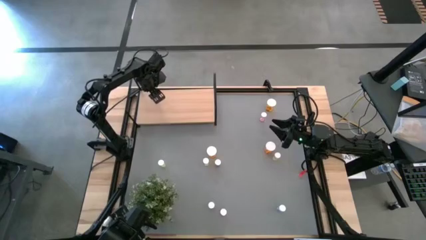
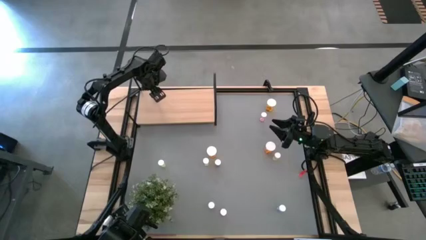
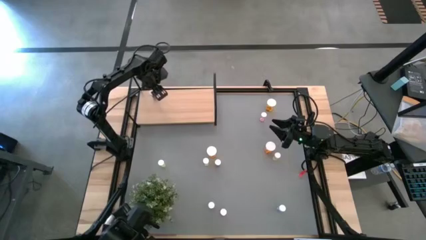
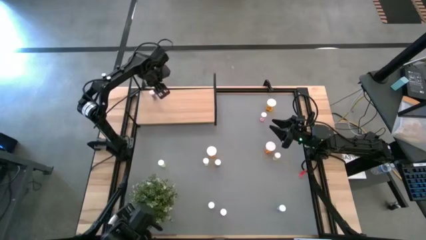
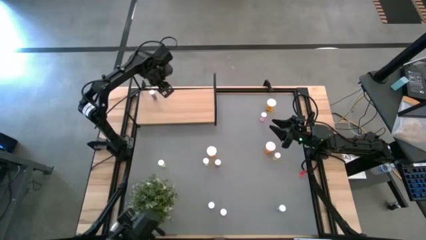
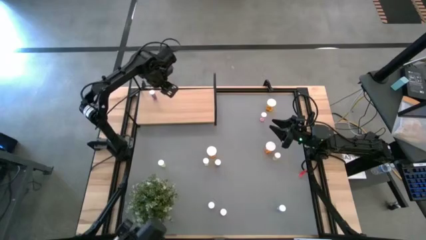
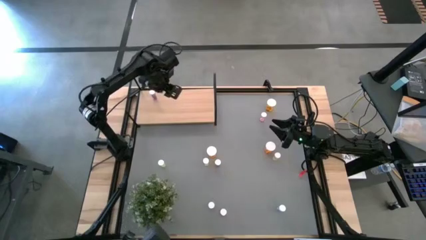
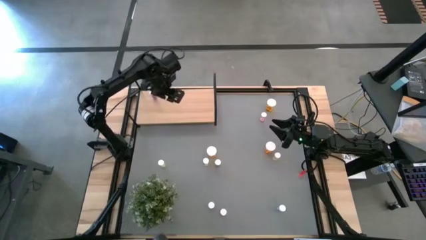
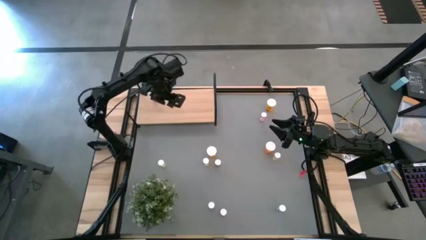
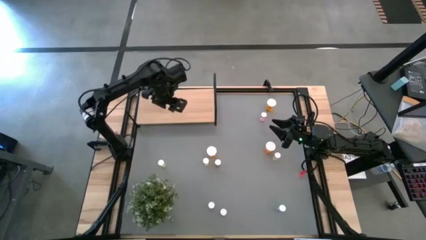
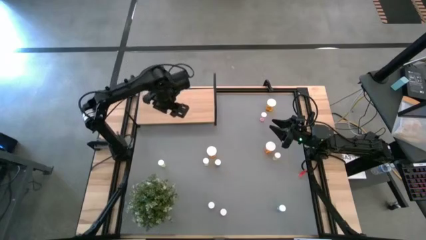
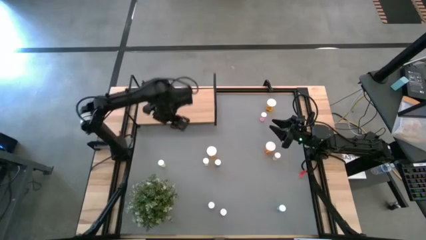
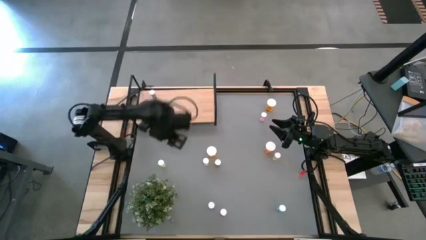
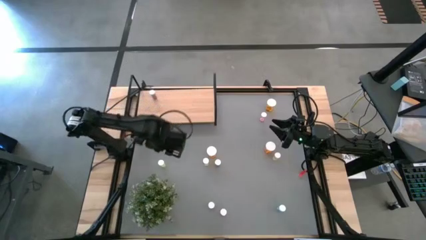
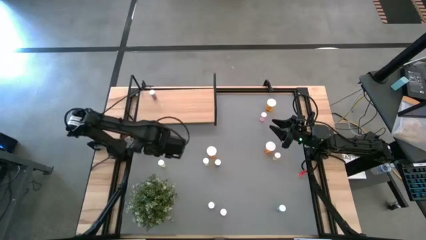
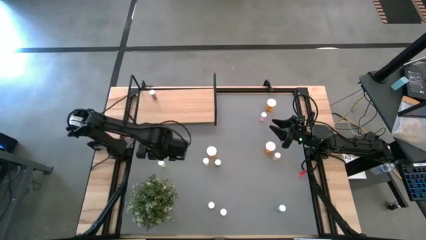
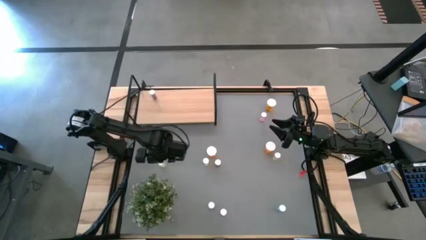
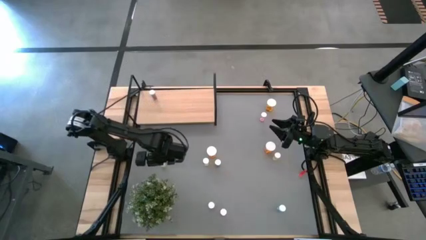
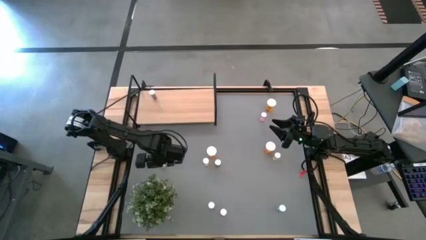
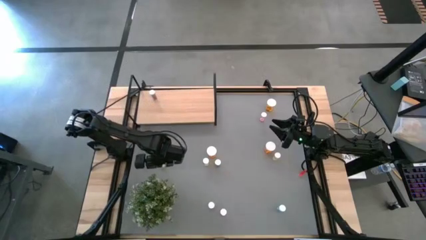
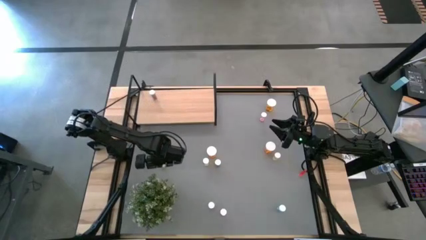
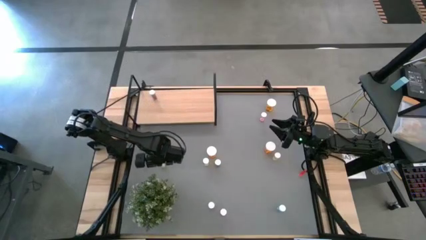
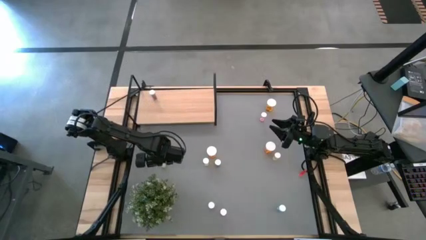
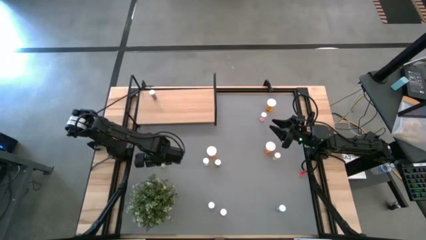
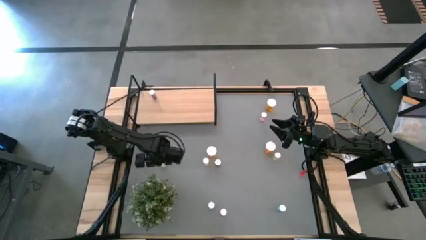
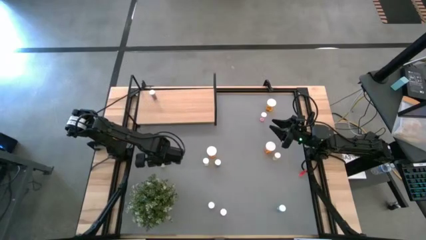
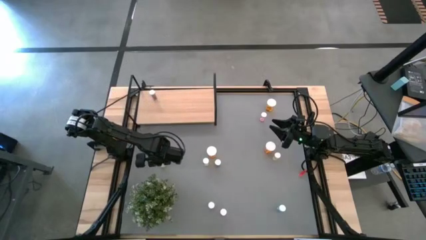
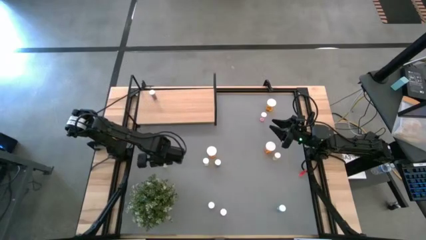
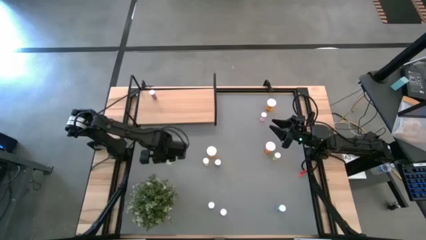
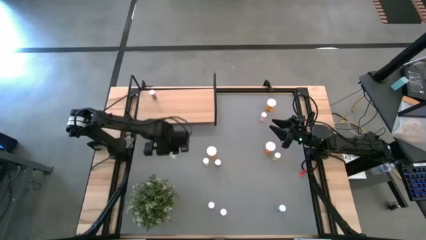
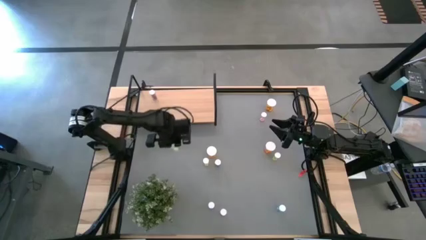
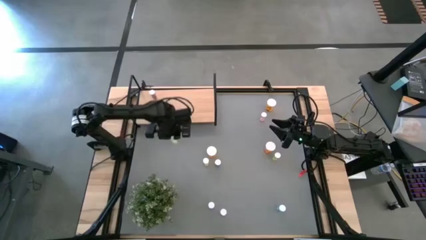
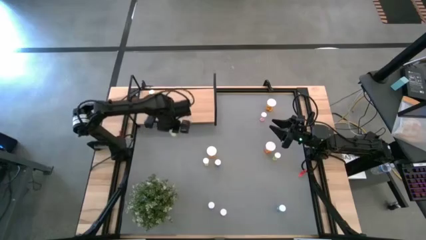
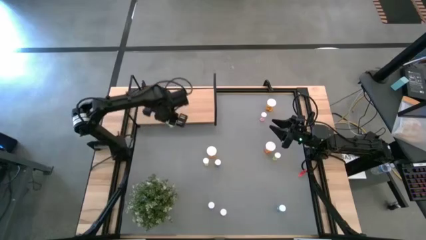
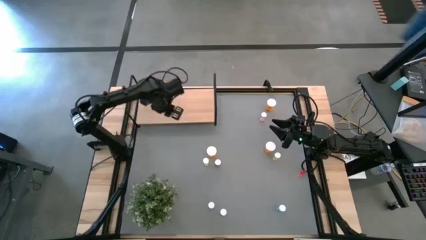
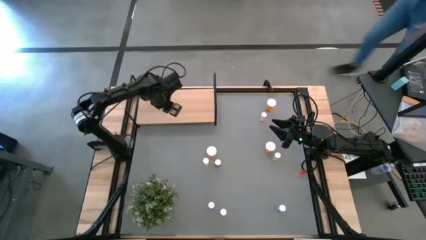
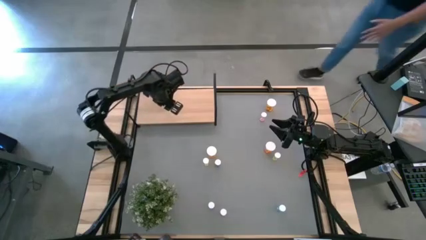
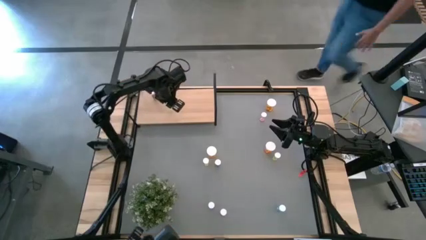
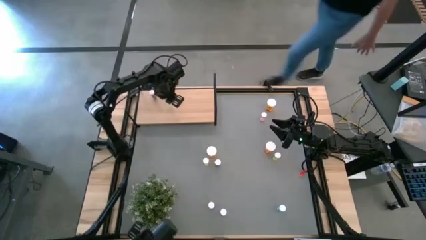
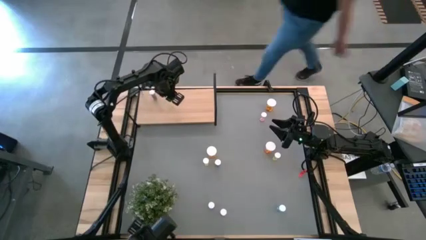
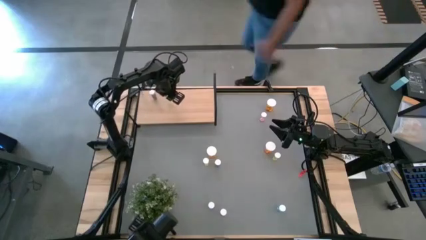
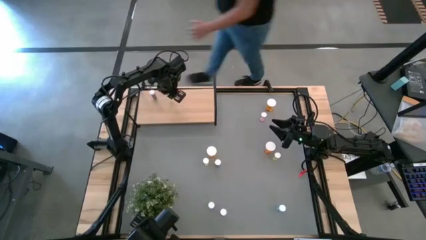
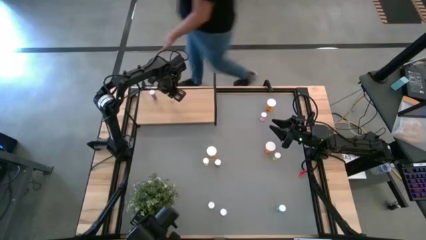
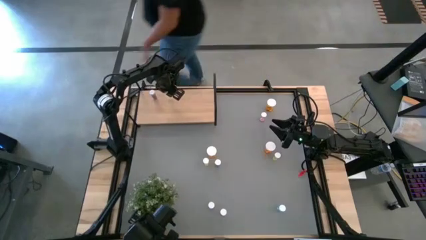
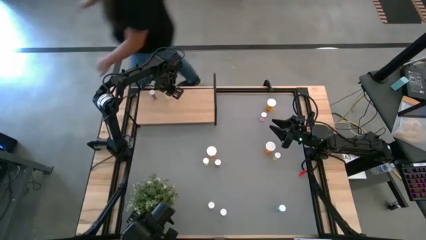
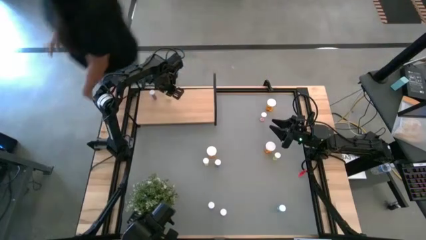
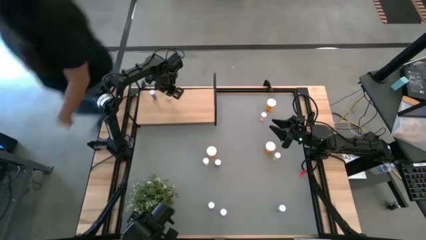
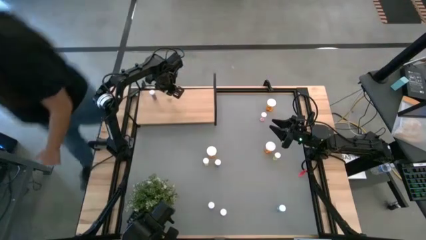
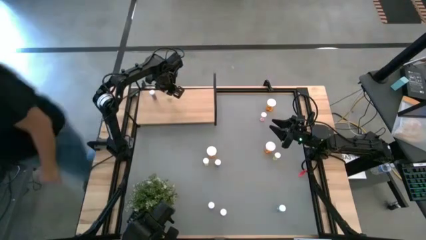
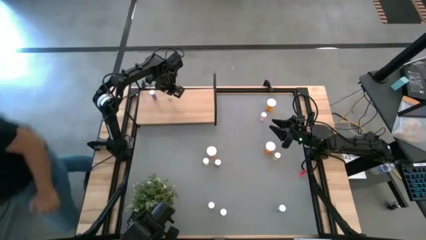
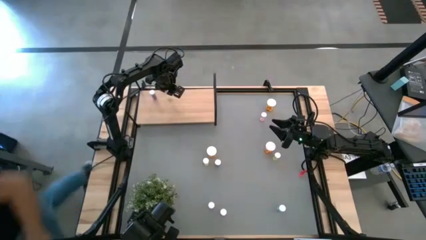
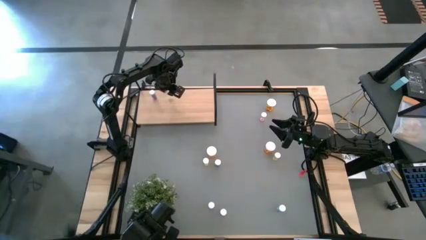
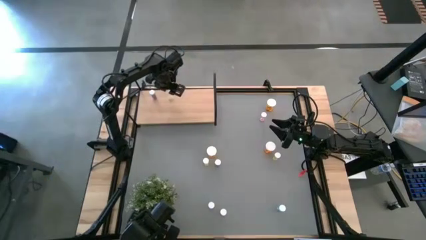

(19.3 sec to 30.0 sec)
Task: Pick and place medicine bottles onto shelf by color
Put the left yellow pill bottle on the shelf
